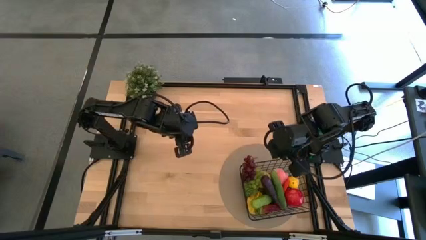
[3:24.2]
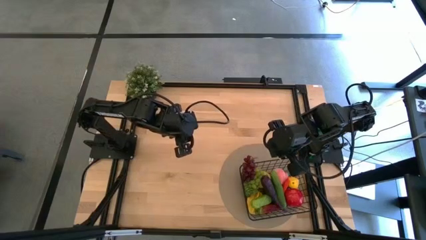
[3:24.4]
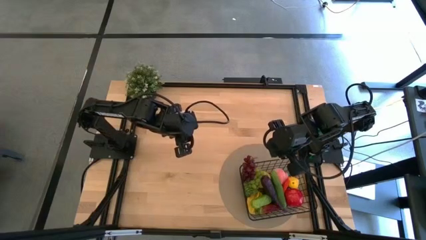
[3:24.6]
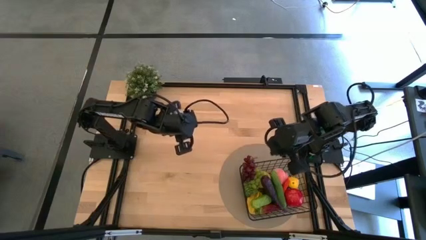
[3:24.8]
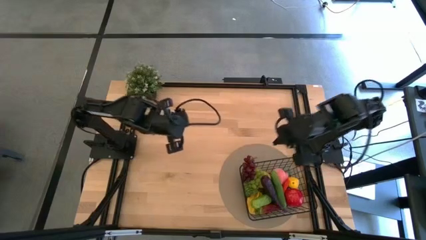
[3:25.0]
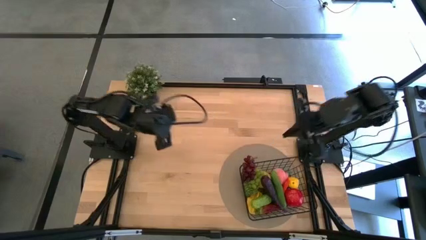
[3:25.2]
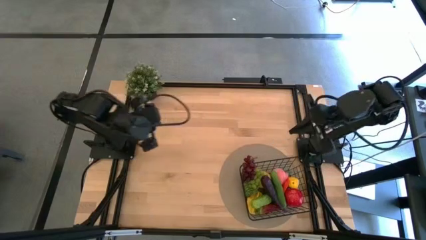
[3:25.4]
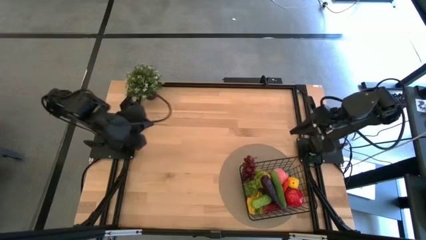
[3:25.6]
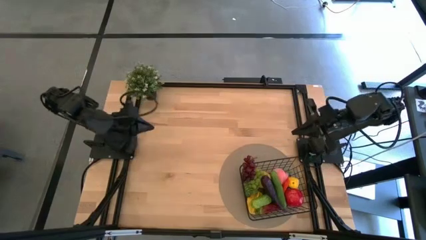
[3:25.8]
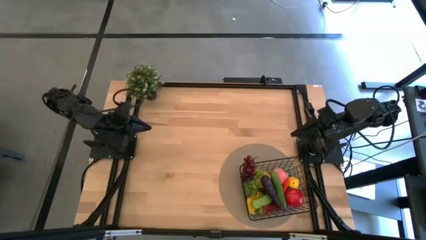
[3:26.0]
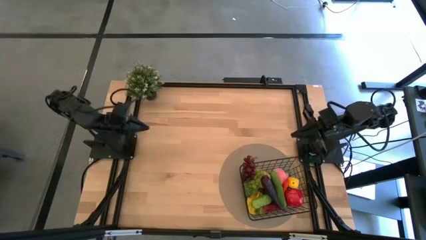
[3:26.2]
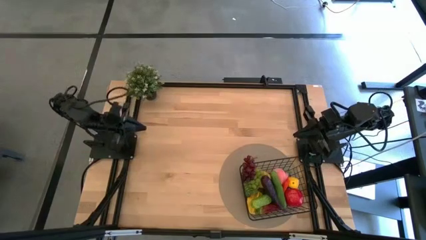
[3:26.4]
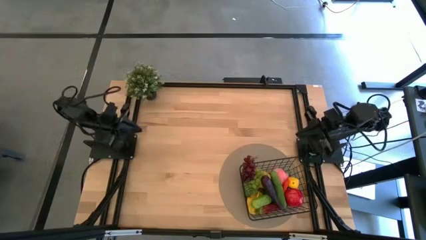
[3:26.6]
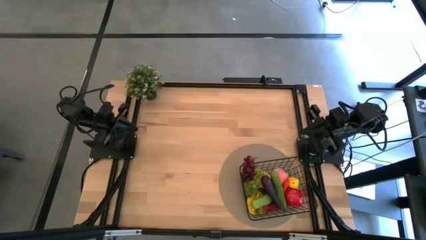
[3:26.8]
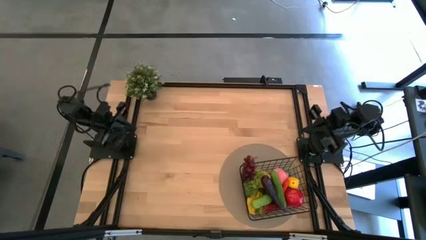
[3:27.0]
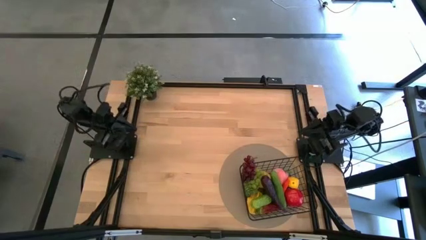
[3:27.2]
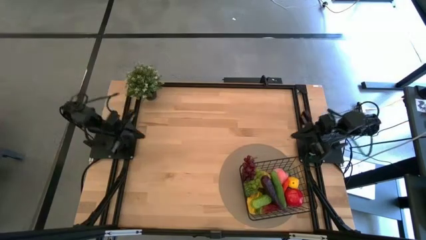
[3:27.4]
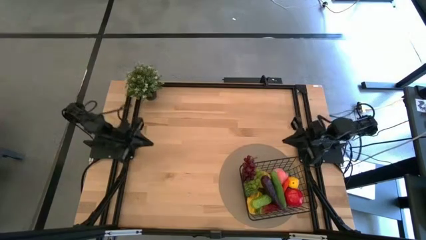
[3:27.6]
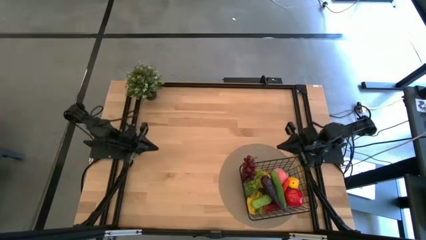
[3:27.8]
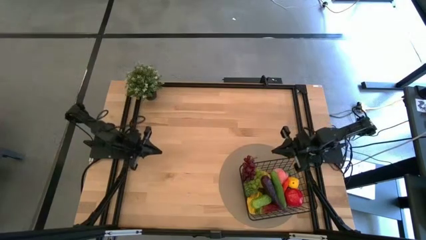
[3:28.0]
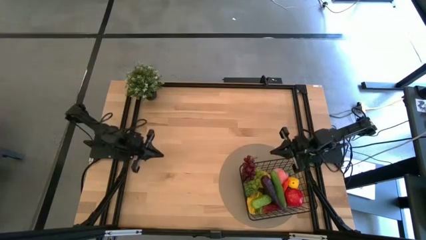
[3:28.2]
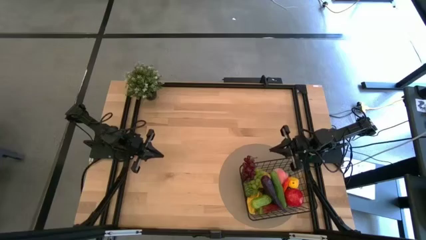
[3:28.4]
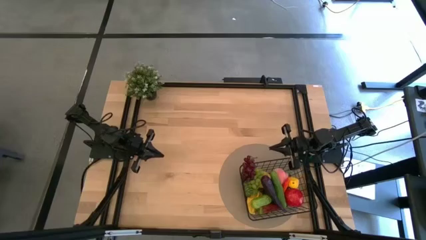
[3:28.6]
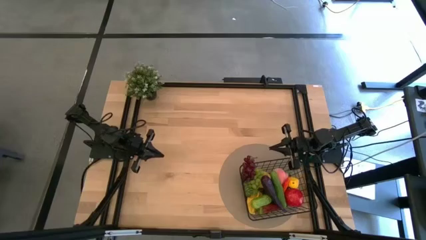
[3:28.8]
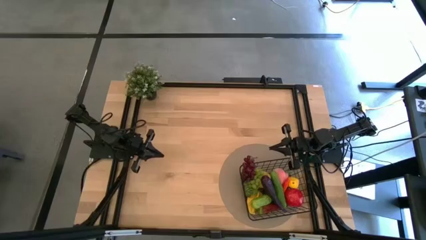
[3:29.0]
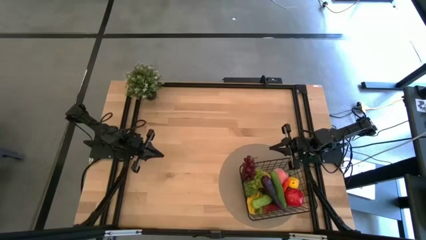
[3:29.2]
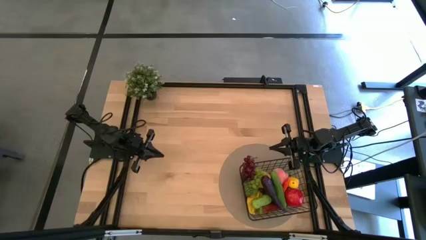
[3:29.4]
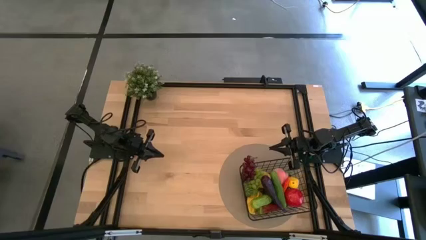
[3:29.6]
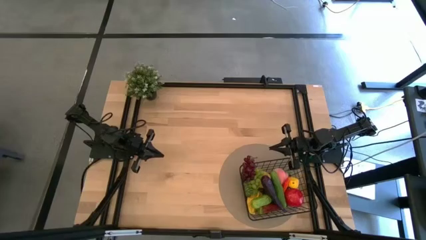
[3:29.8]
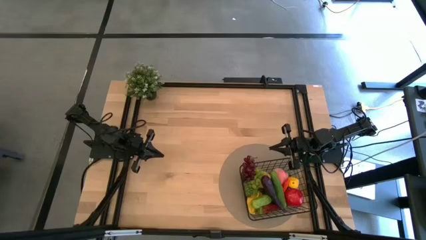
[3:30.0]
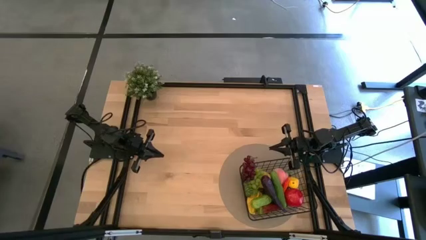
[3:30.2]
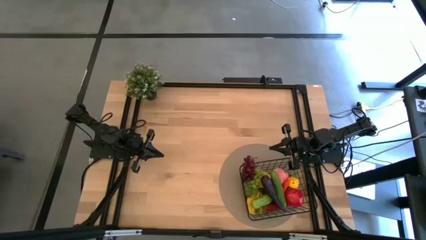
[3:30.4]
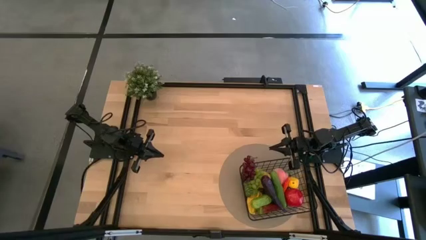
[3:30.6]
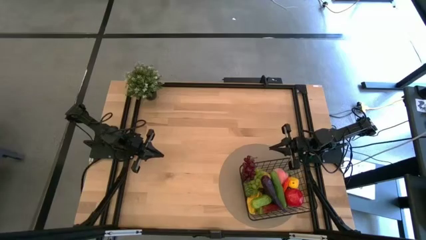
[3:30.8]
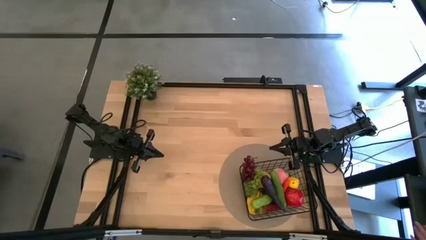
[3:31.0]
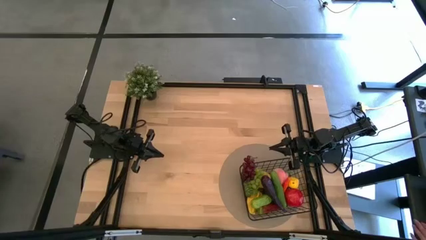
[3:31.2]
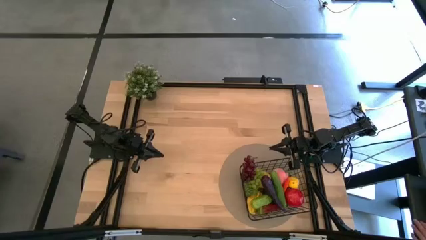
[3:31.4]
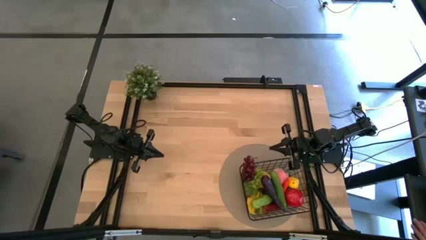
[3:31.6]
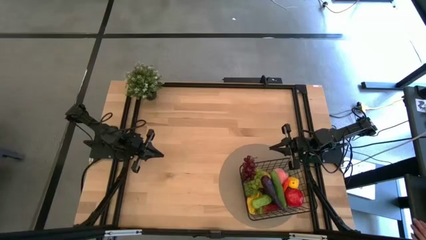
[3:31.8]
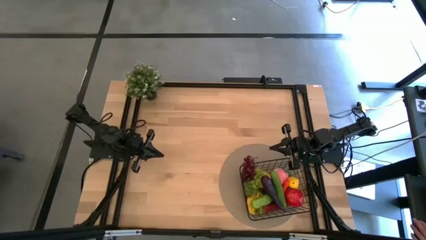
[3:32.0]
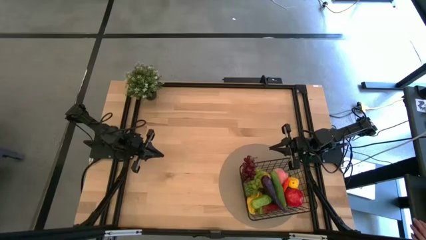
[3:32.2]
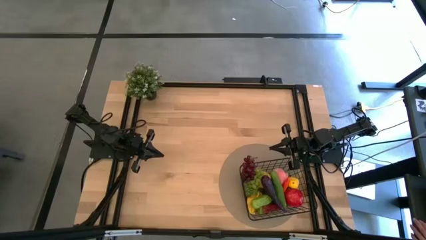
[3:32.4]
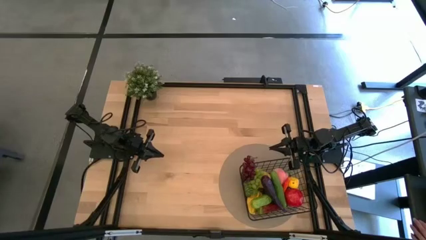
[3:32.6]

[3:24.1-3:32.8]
Task: Build produce basket
Return to Home Position

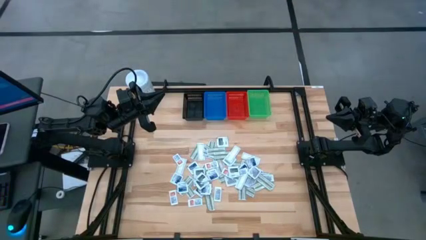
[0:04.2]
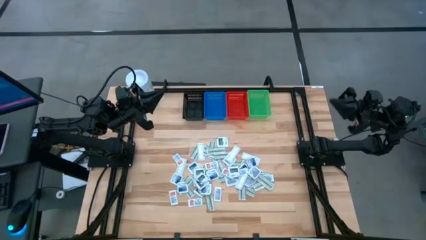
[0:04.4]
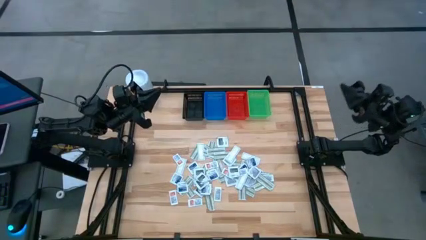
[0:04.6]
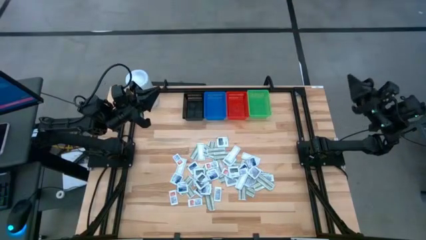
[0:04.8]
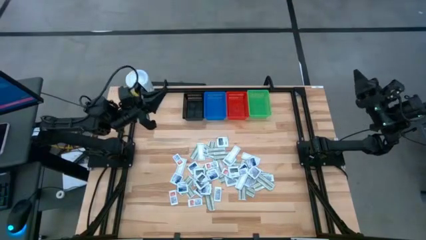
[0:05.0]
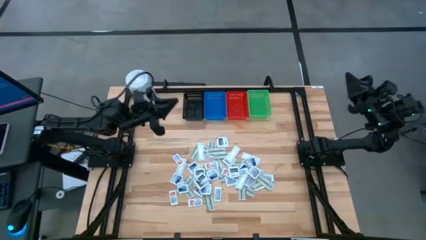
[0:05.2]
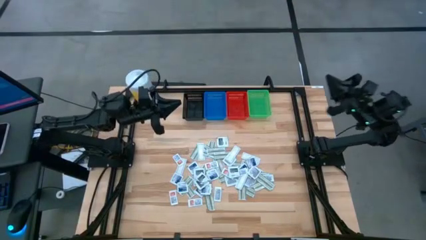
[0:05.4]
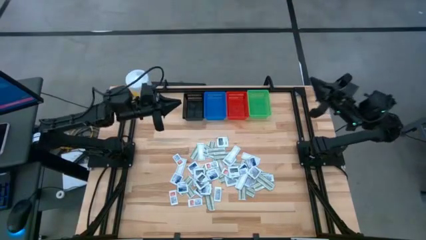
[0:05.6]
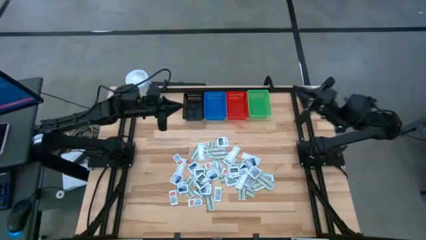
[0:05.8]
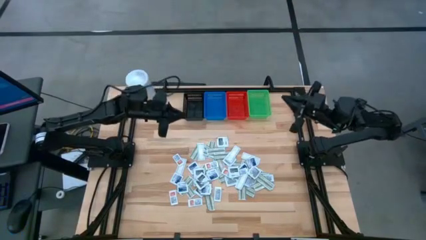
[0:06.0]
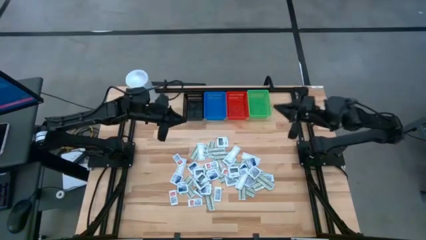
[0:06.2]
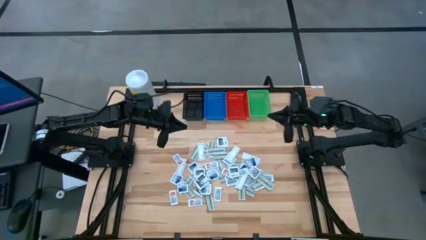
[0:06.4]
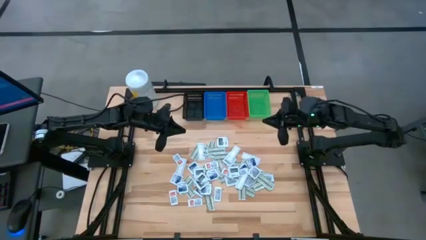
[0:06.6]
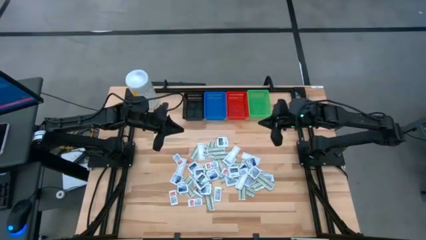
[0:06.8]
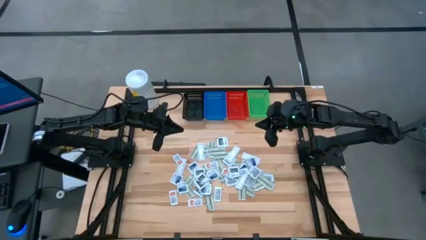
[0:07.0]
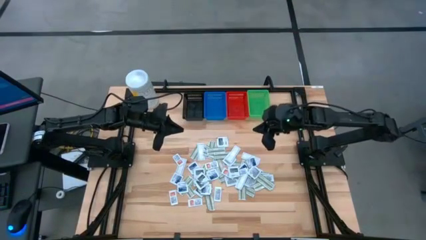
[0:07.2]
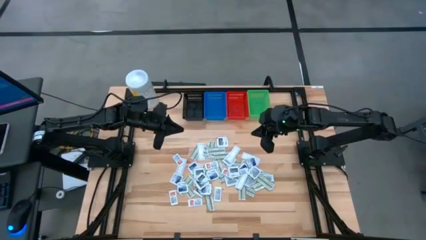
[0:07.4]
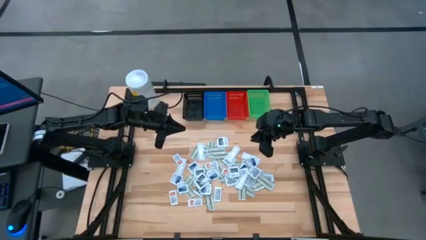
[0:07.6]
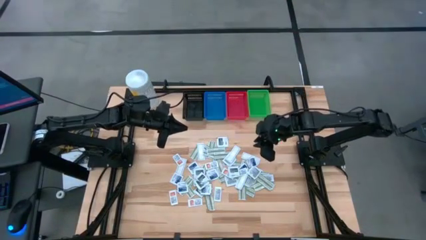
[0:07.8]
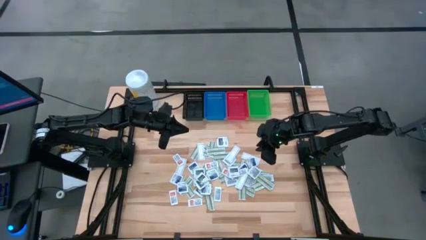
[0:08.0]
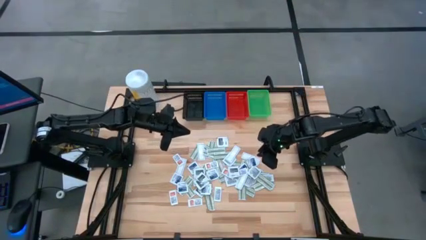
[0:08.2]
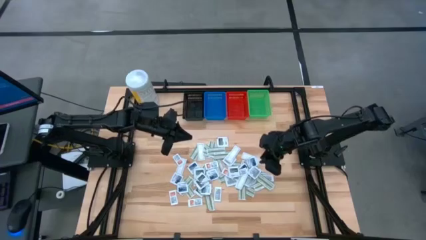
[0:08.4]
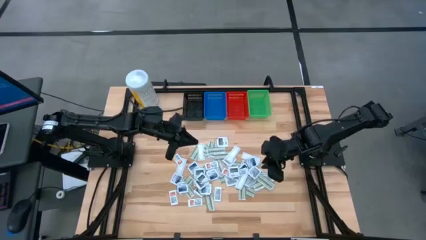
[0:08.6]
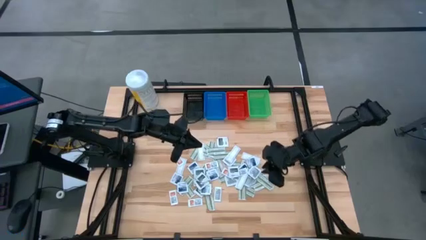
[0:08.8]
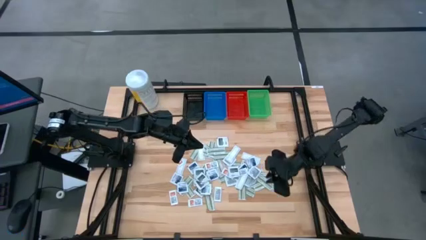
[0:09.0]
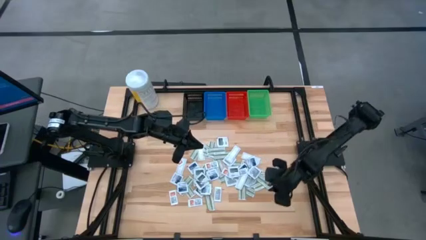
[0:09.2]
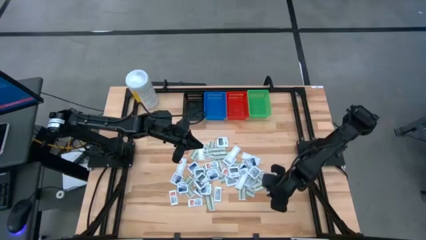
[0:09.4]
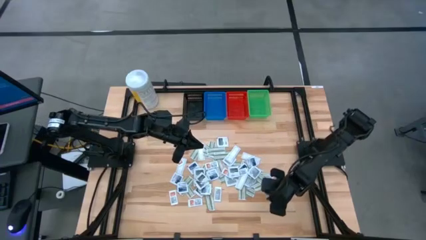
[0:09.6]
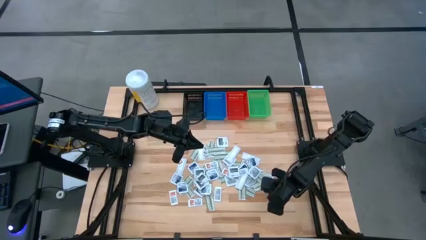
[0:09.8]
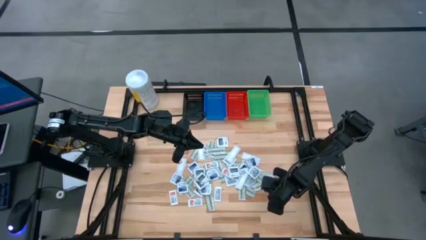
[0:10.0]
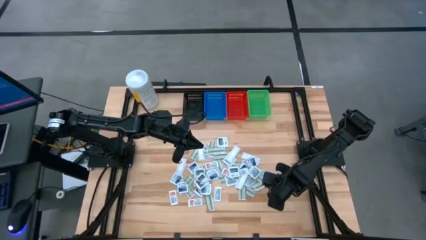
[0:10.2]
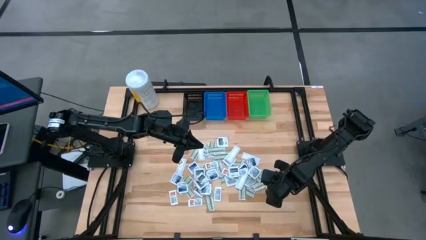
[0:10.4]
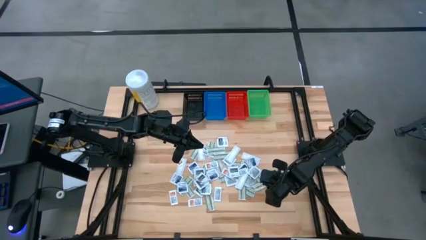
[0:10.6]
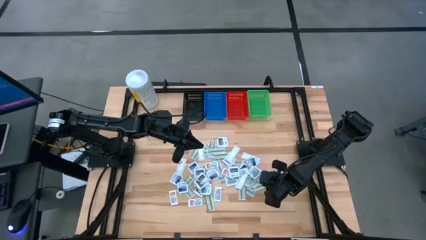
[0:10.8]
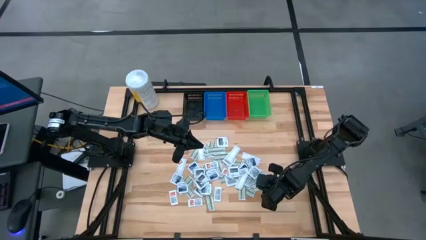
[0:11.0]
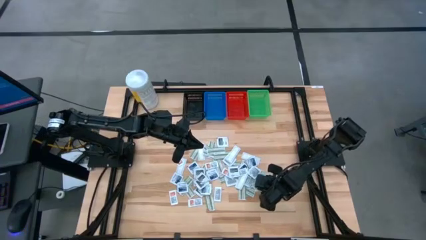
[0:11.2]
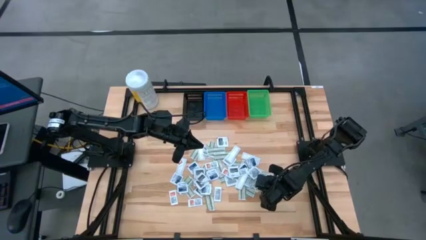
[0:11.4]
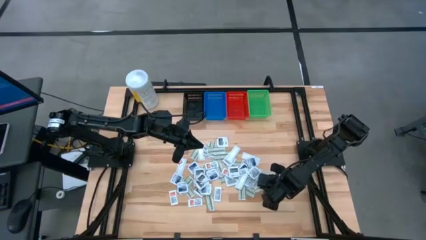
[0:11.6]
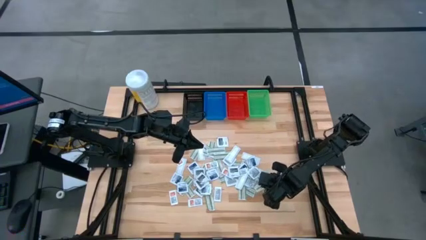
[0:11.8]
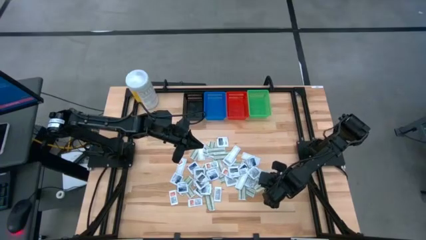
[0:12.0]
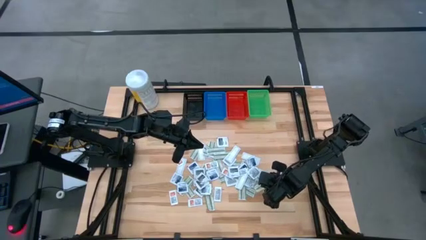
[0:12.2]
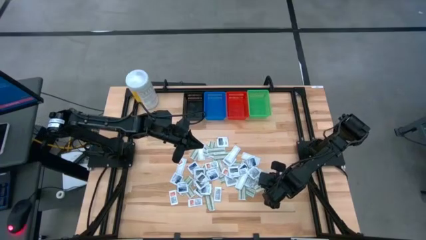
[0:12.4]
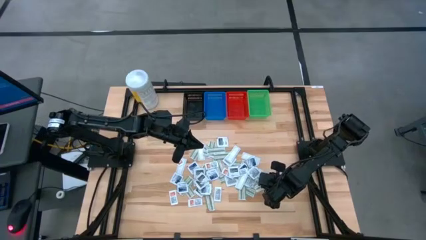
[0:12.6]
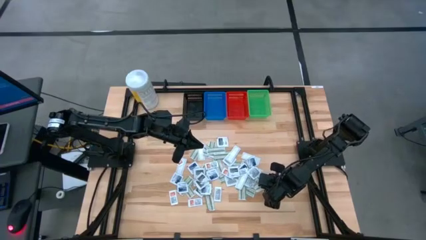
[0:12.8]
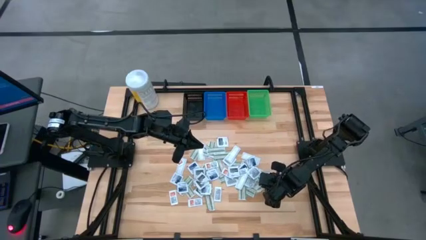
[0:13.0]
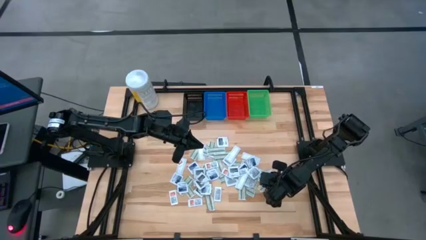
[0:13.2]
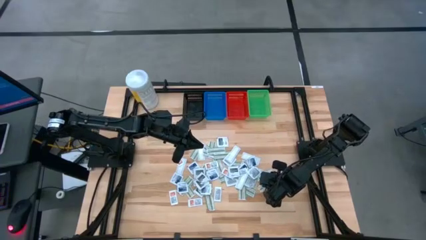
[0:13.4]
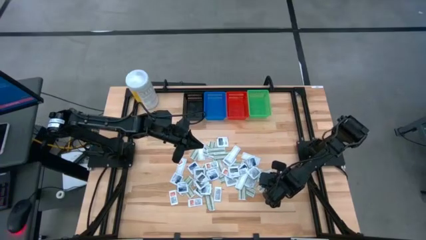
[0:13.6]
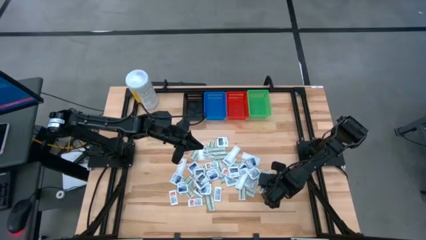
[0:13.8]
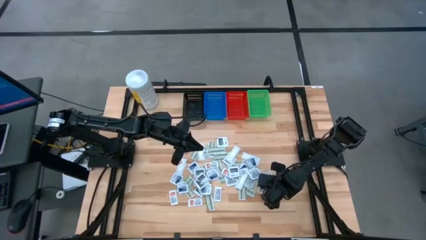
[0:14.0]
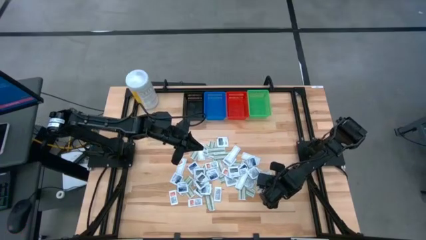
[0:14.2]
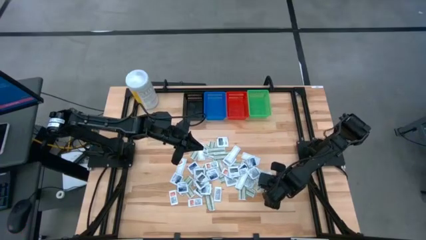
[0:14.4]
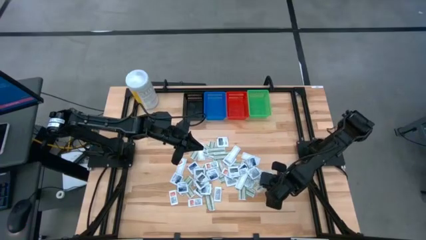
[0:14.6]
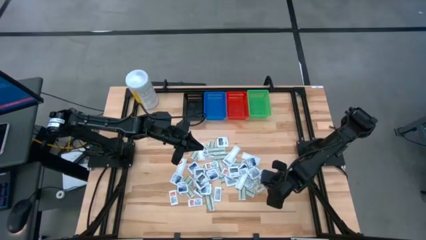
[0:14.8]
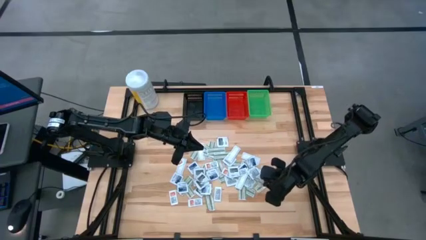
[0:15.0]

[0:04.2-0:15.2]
Task: Pick & Place First Aid Supplies
Put the green bandage pack in the black bin
